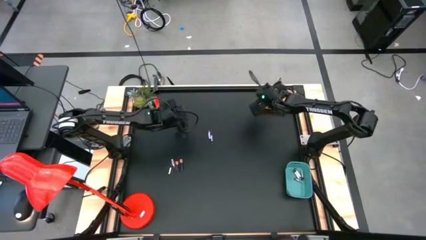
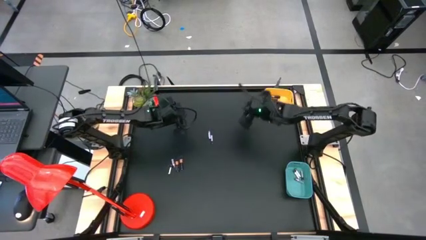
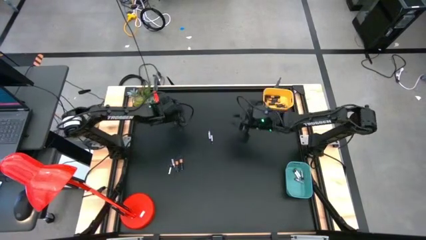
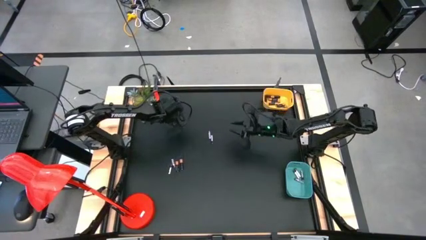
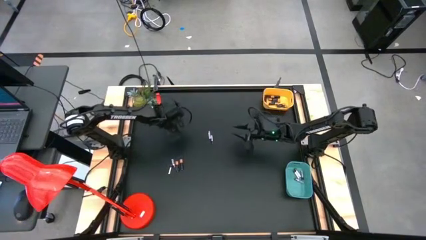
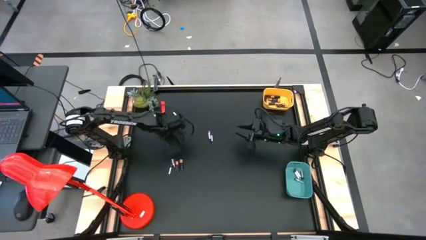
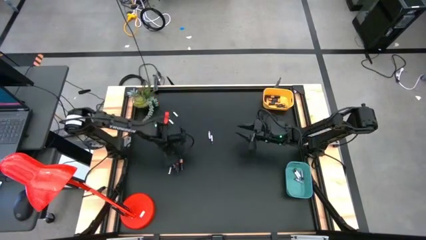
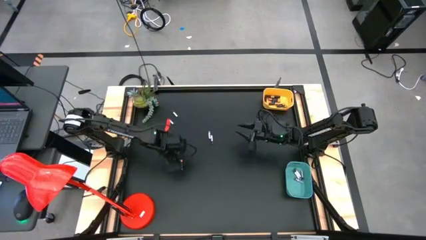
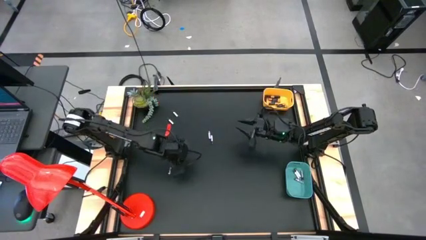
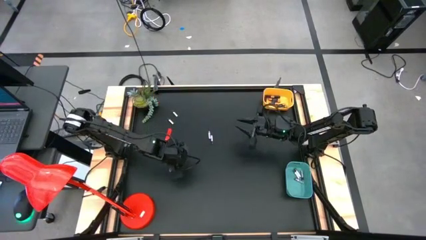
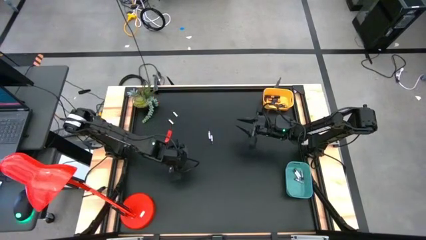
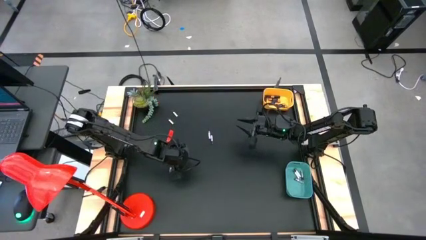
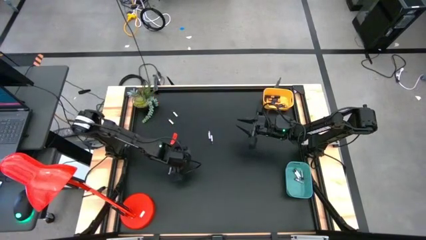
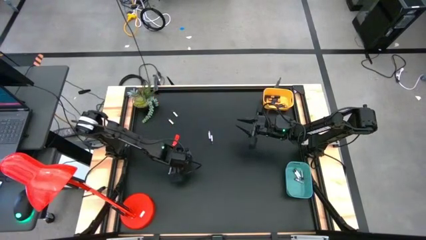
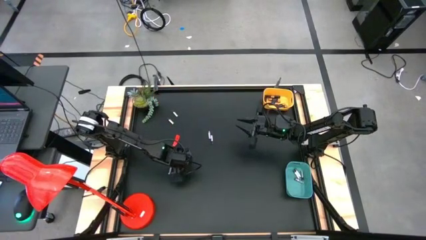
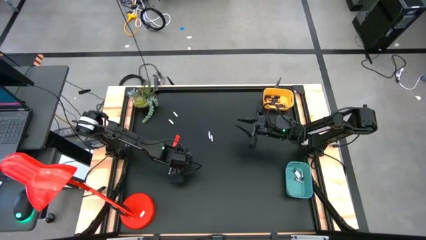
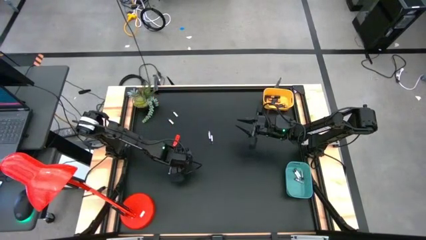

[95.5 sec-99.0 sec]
Task: Sort batteries
Put the black battery into the yellow bin

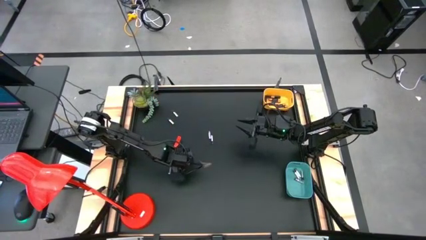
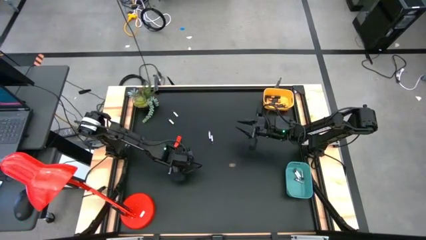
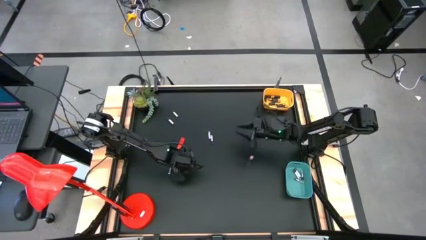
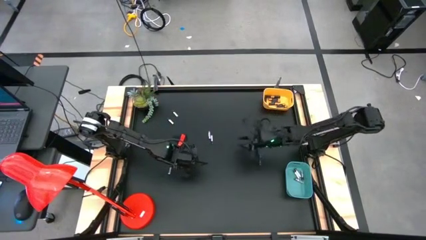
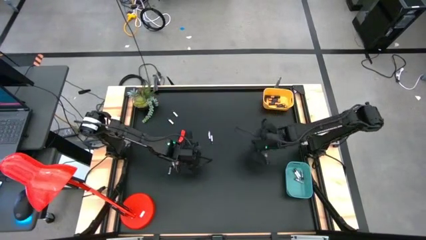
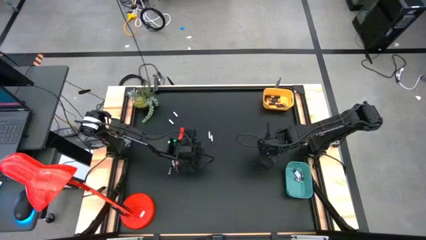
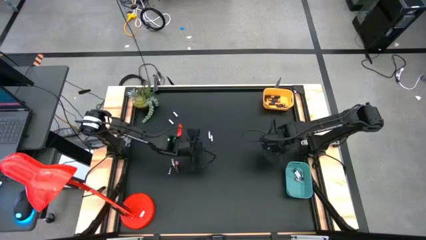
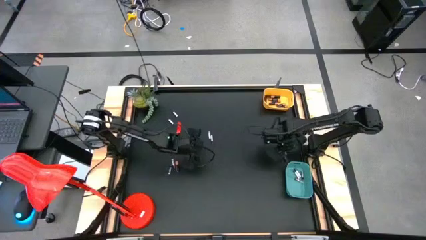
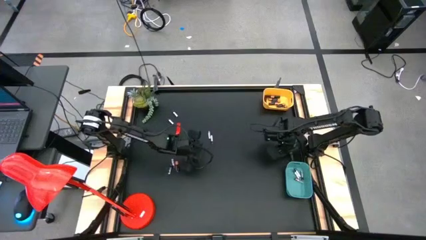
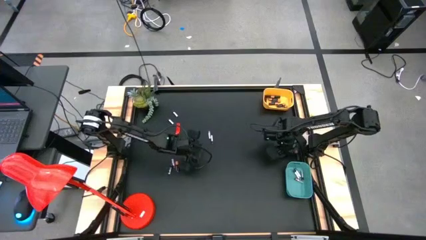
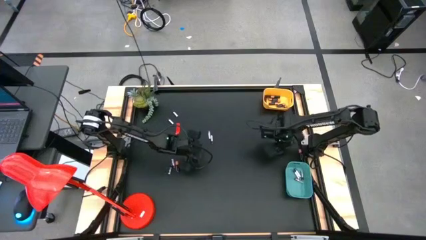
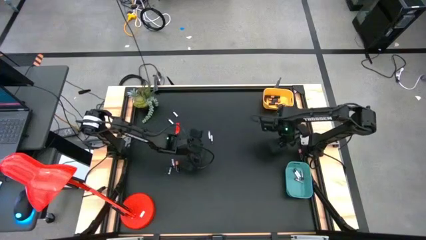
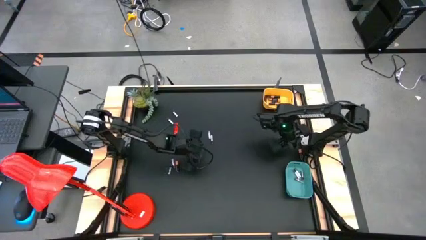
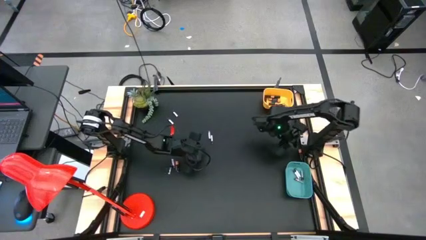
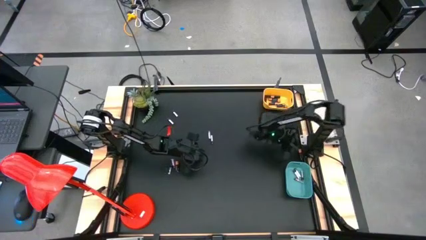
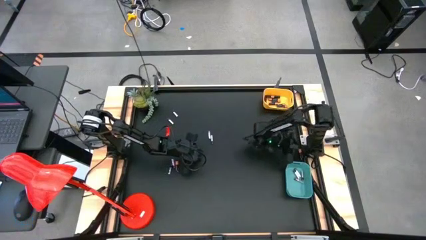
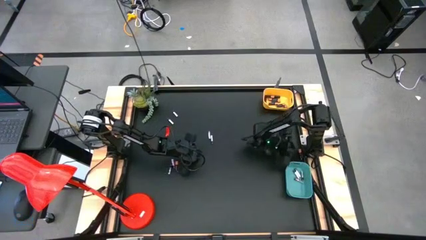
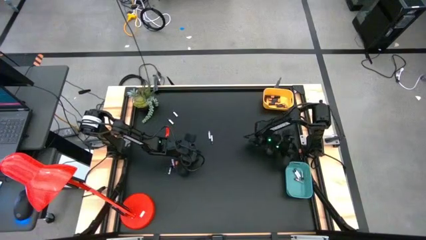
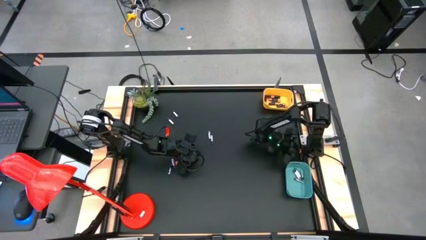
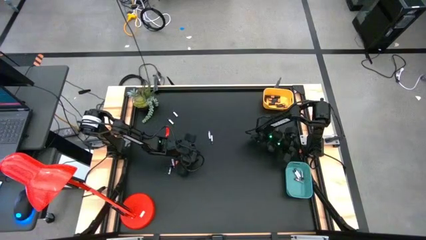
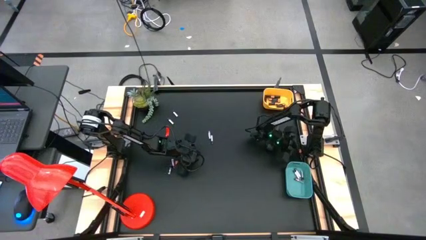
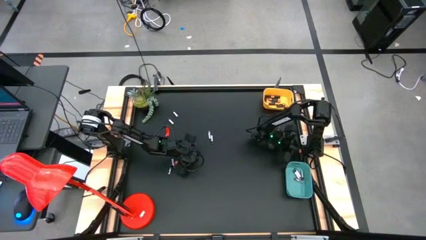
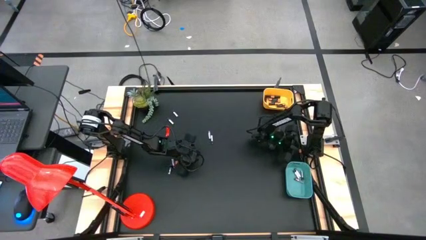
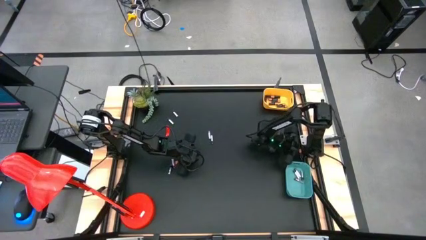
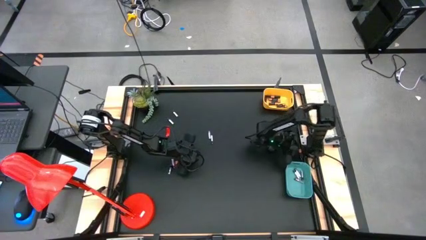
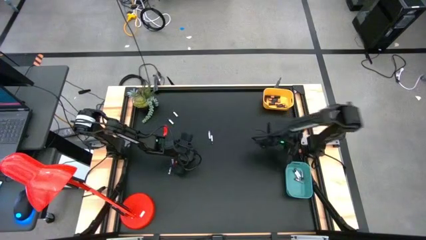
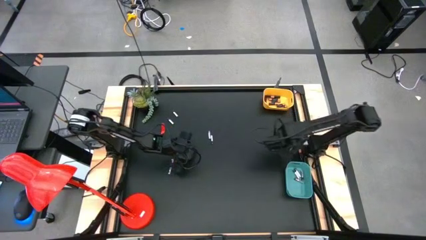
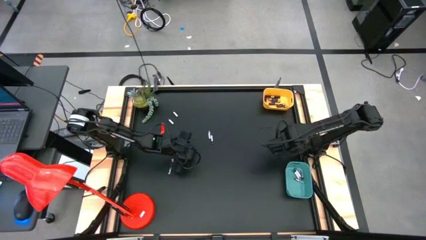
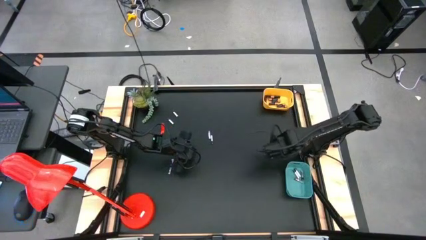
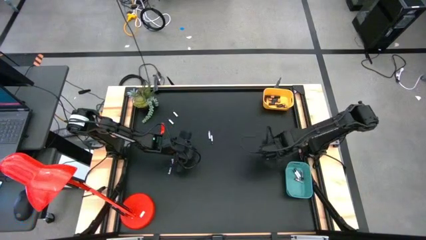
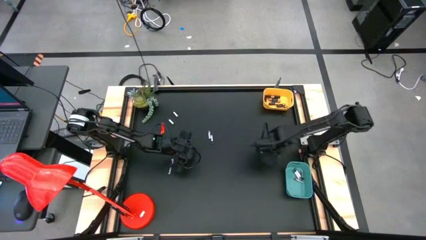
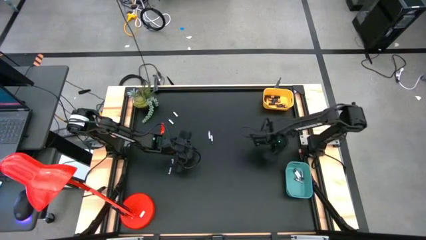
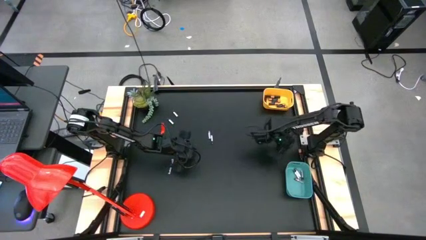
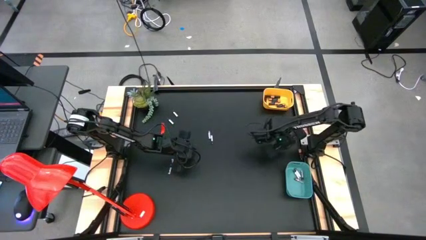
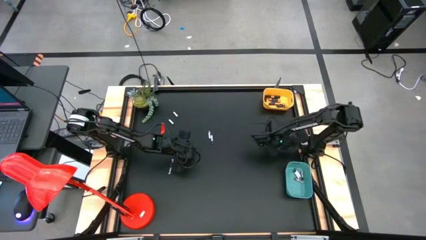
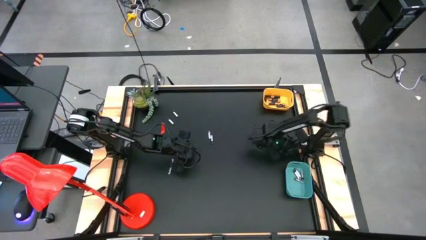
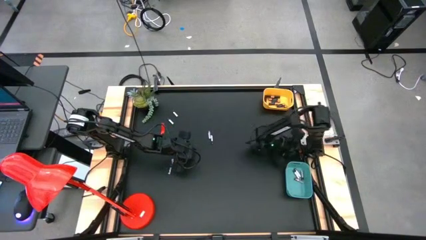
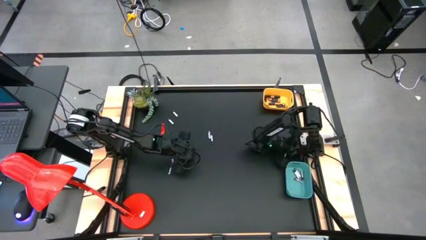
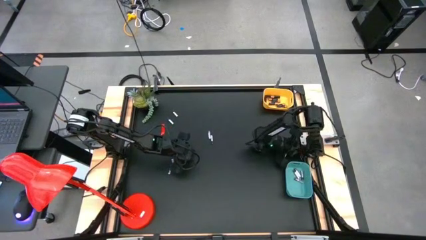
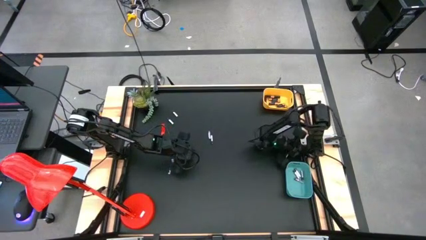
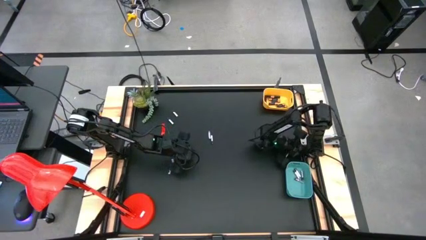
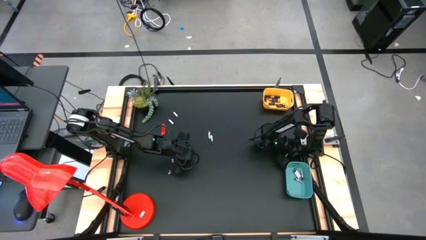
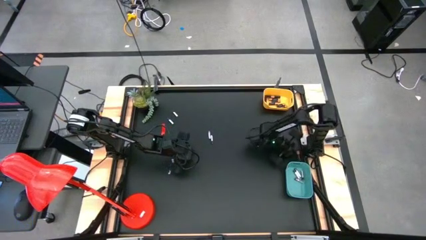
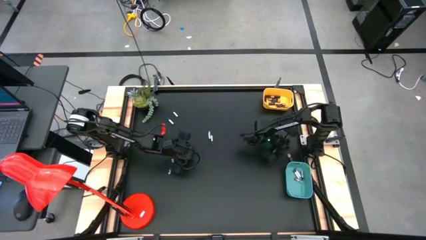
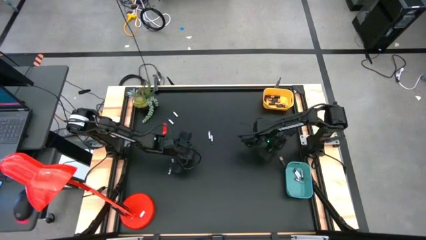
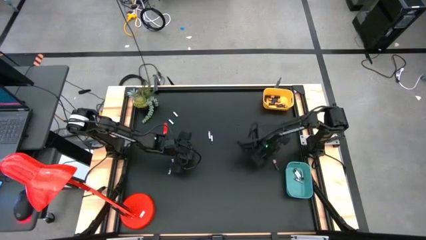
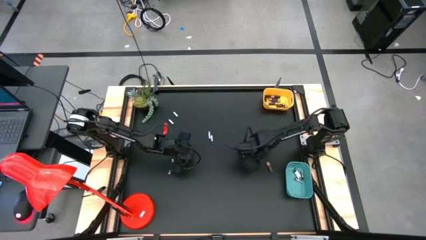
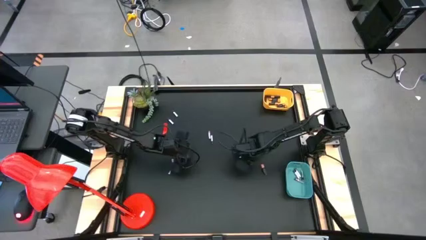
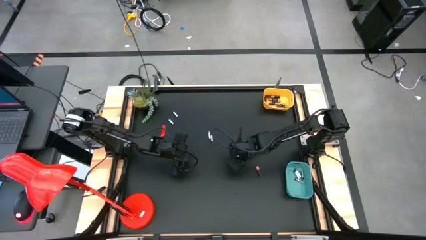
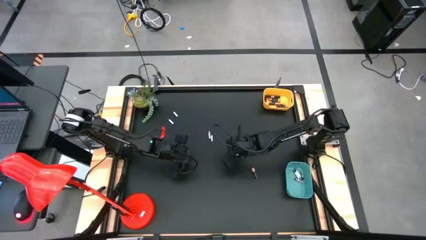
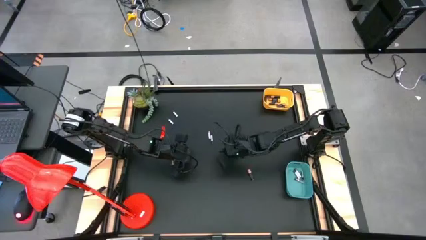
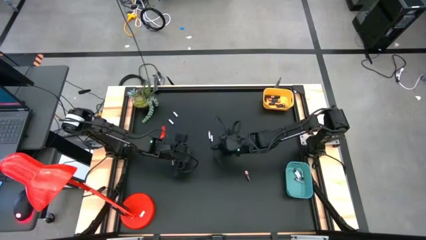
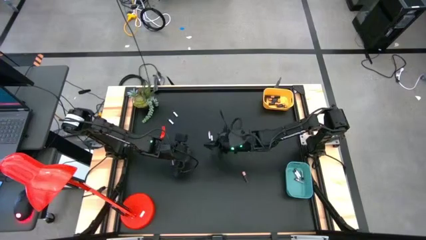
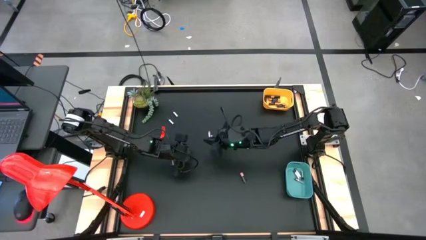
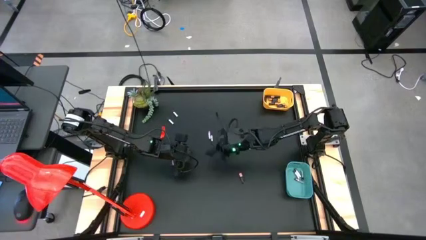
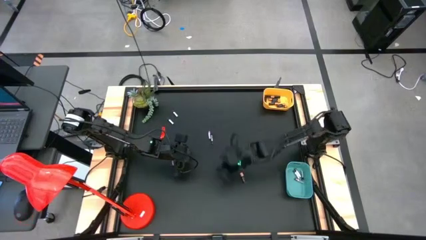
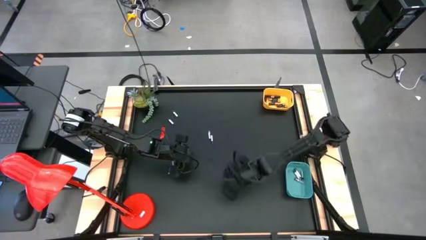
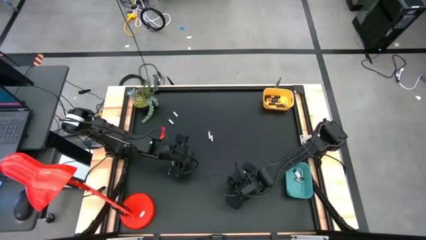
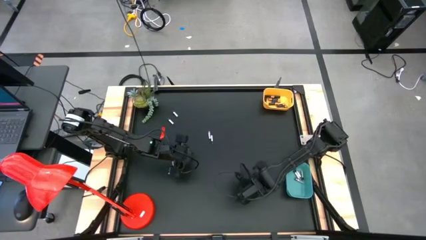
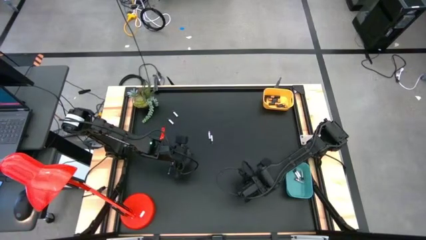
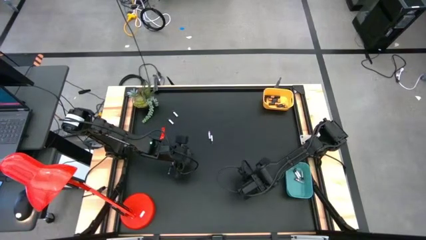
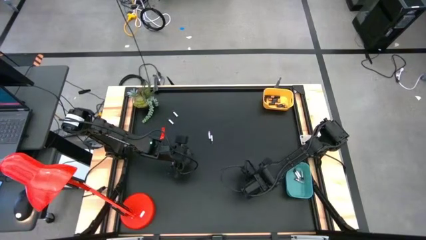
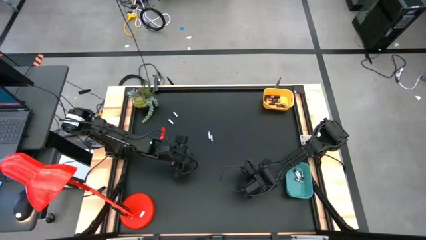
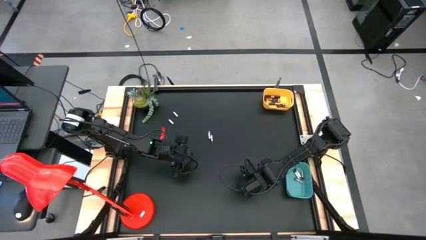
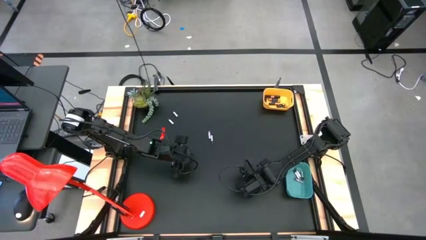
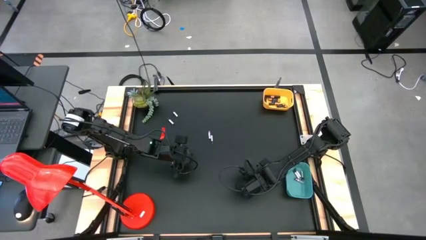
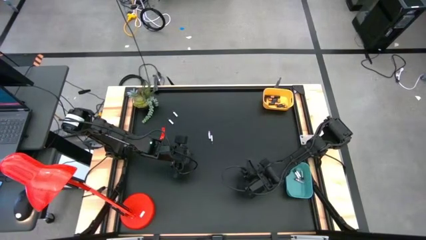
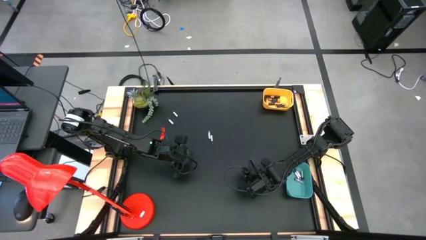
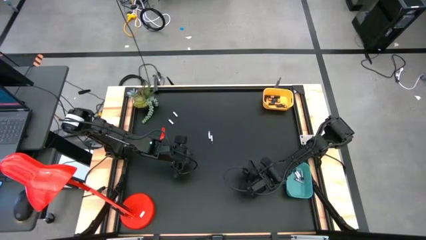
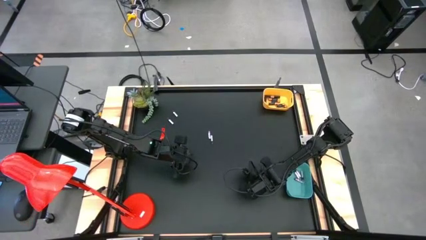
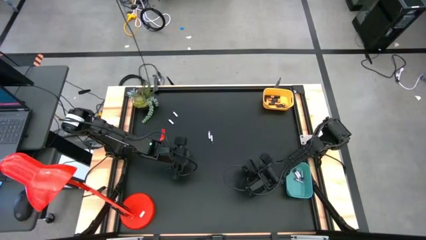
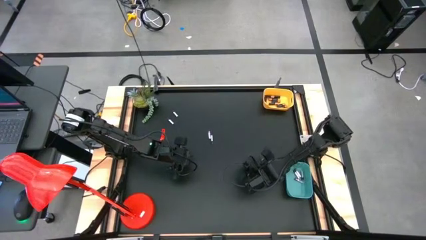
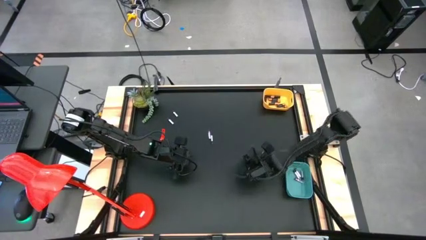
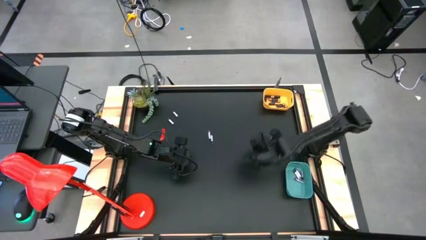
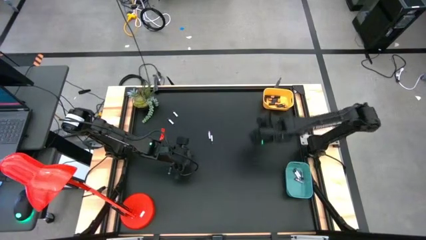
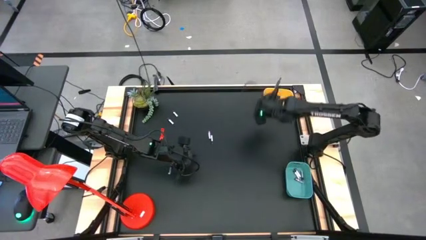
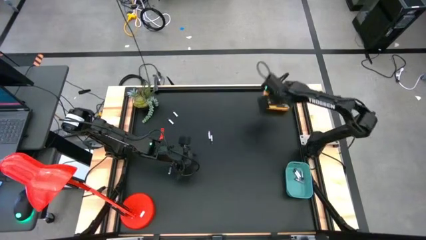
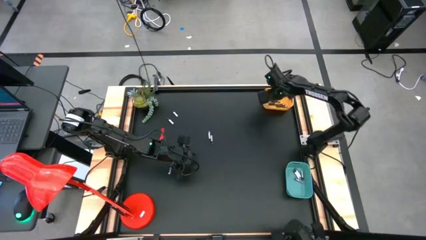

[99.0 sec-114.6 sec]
Put the black battery into the yellow bin
